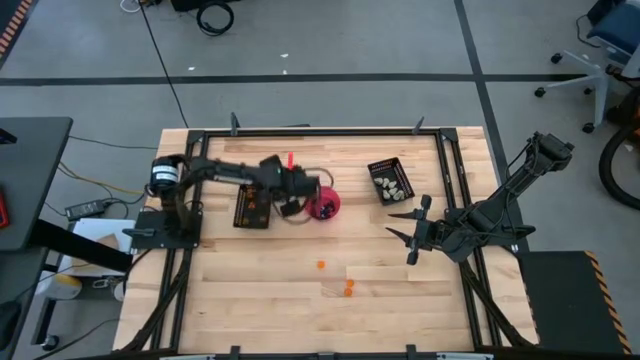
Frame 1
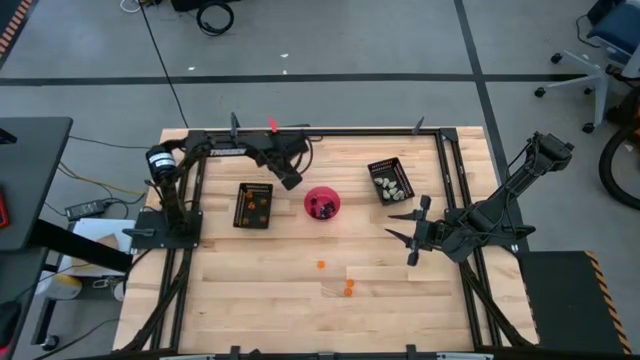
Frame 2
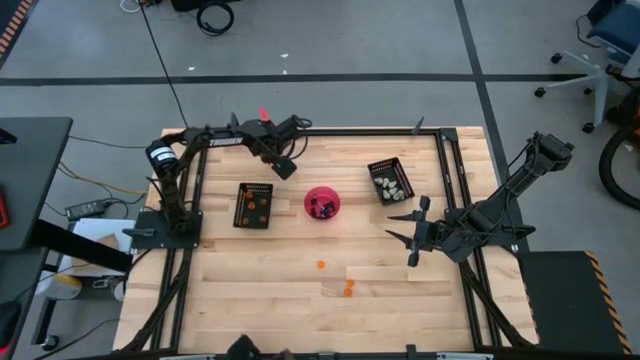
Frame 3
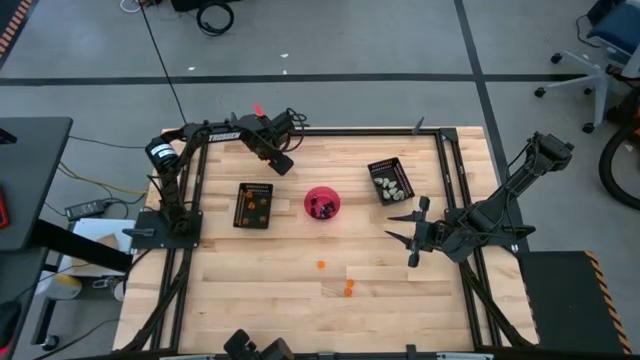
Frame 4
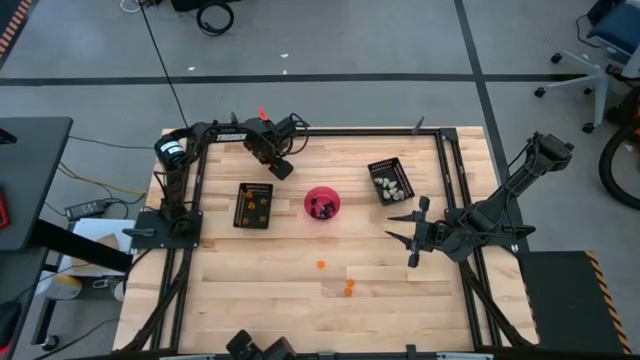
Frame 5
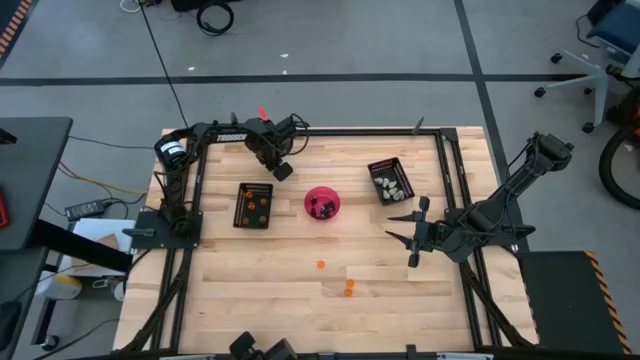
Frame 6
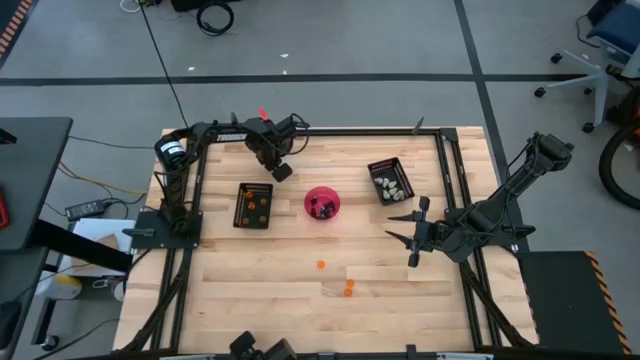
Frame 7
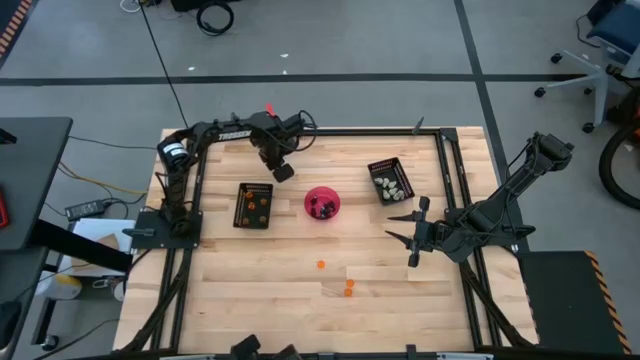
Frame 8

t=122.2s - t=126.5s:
Task: Sort Halloween decoration
Put the orange pumpkin toy into the left black bin

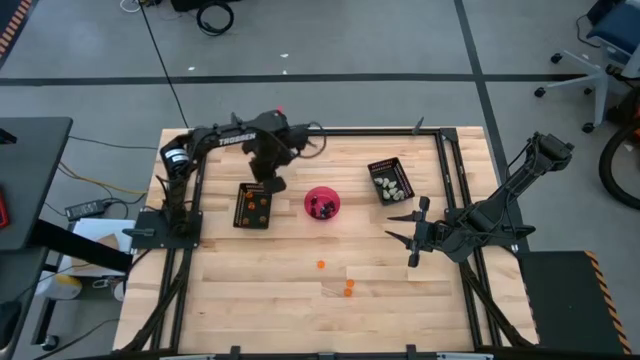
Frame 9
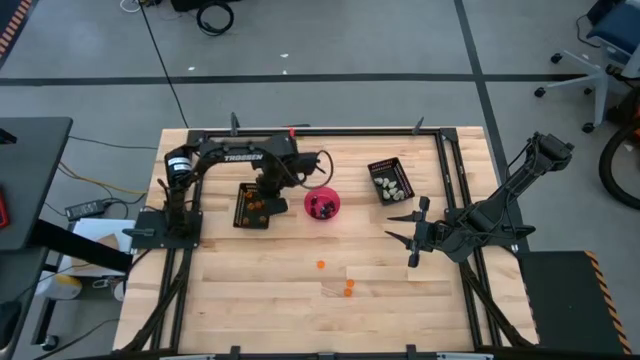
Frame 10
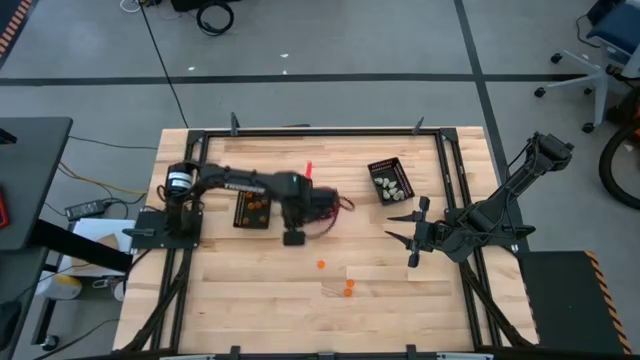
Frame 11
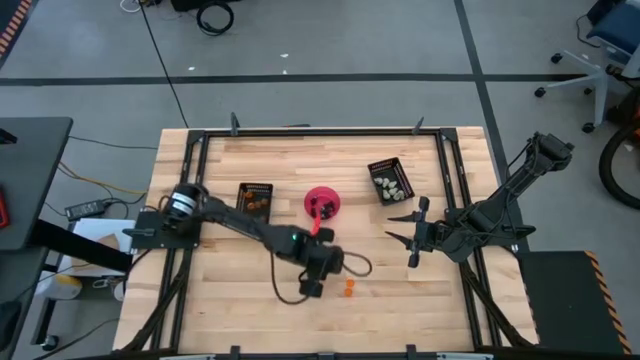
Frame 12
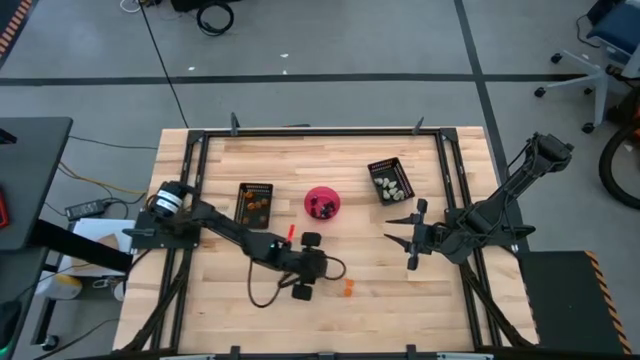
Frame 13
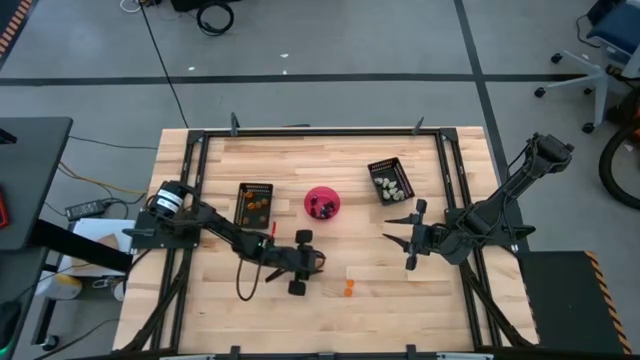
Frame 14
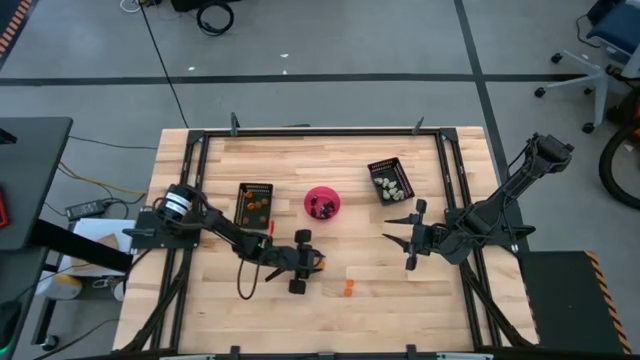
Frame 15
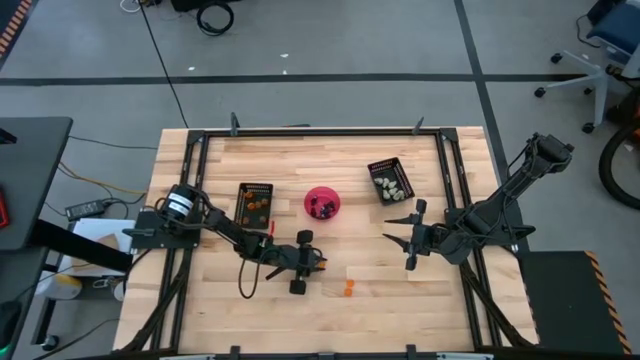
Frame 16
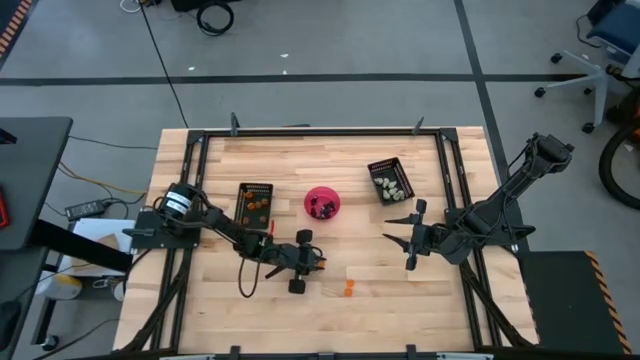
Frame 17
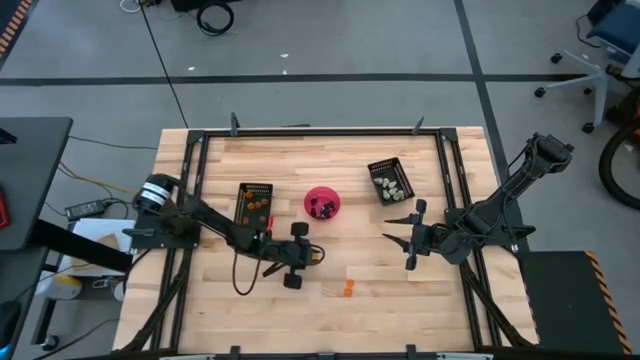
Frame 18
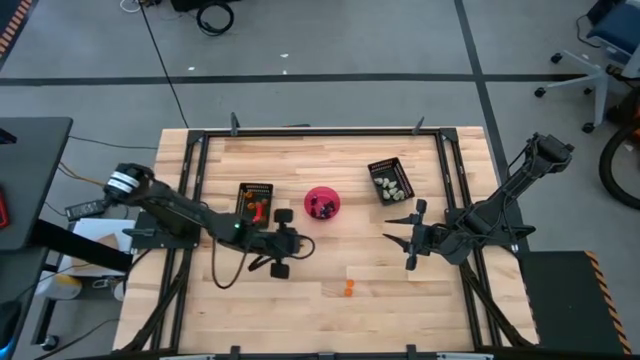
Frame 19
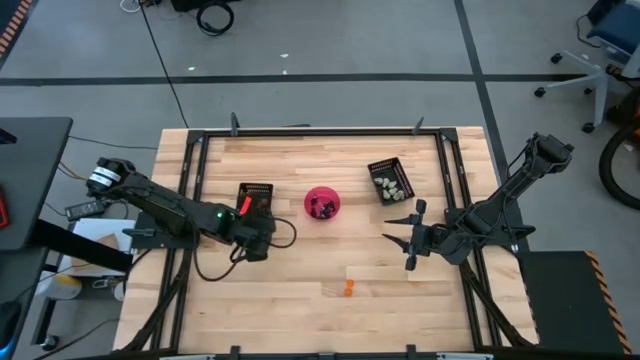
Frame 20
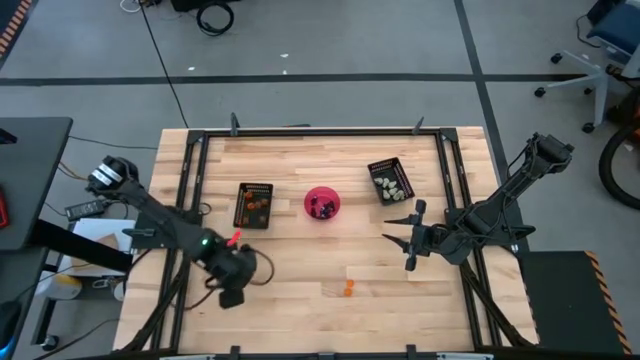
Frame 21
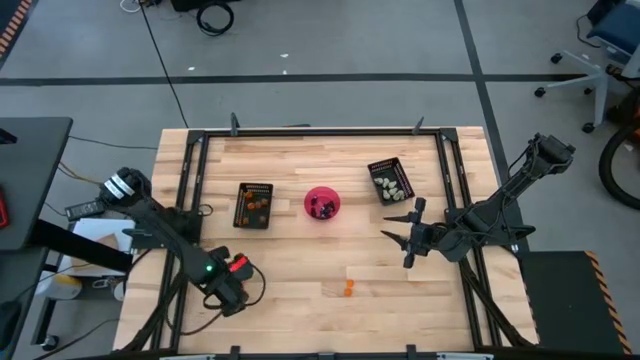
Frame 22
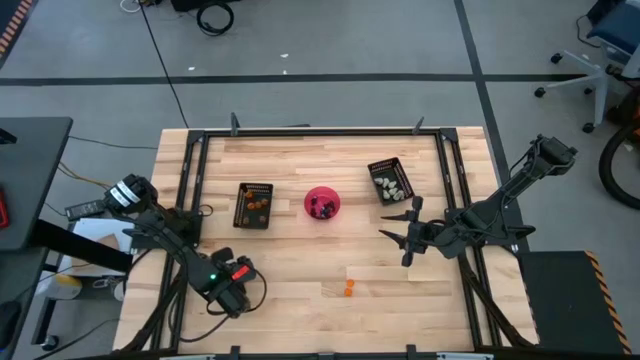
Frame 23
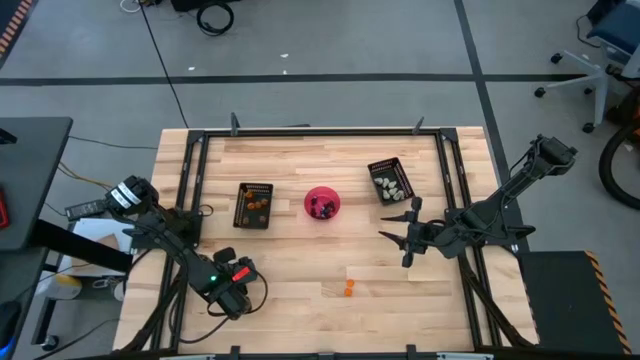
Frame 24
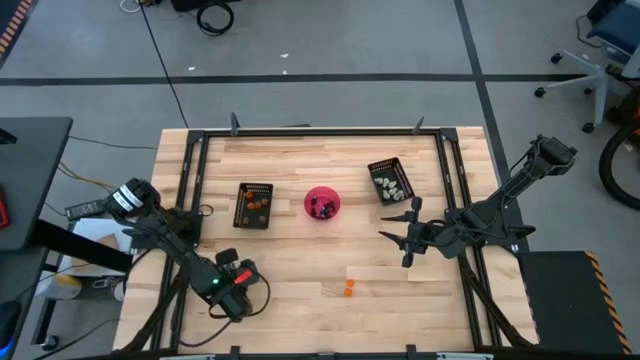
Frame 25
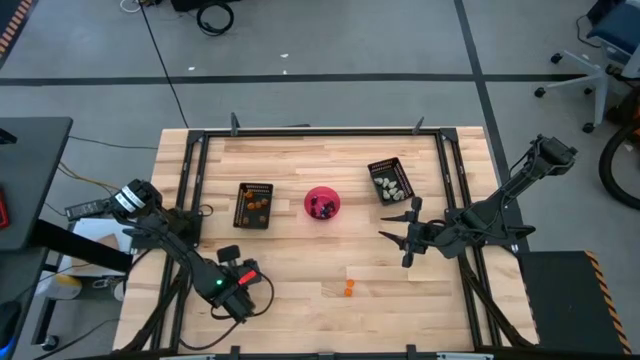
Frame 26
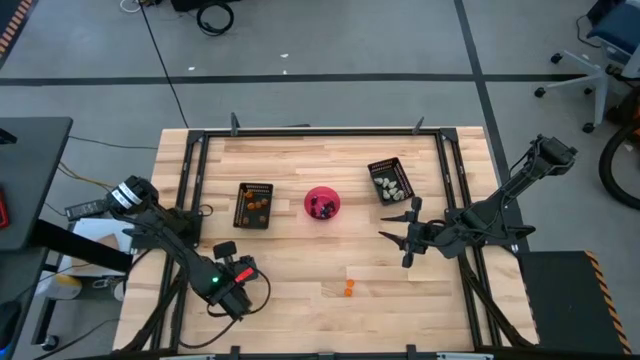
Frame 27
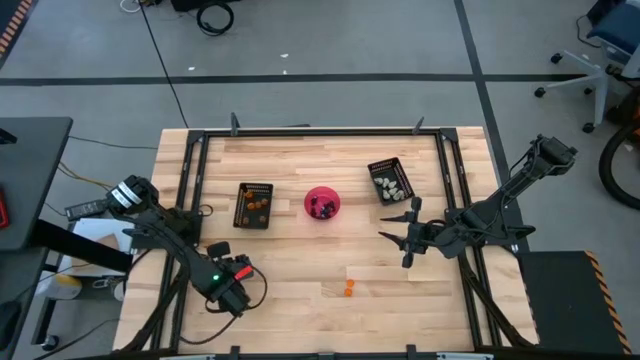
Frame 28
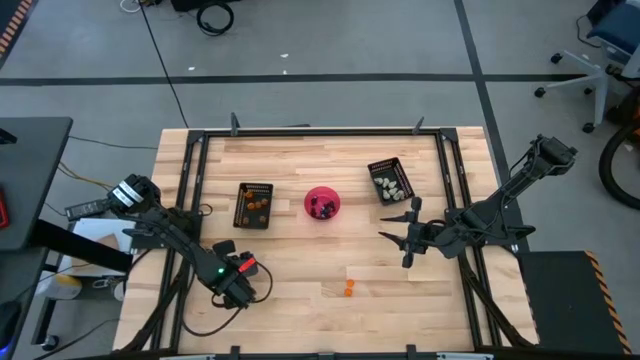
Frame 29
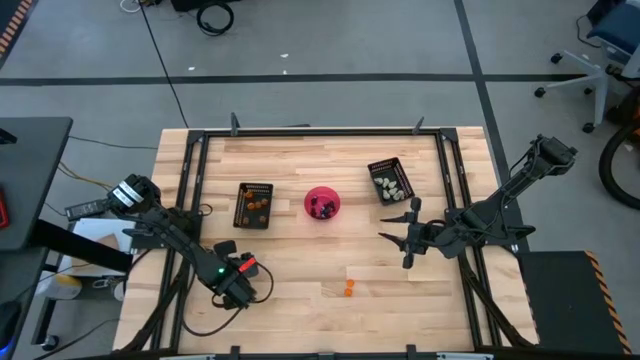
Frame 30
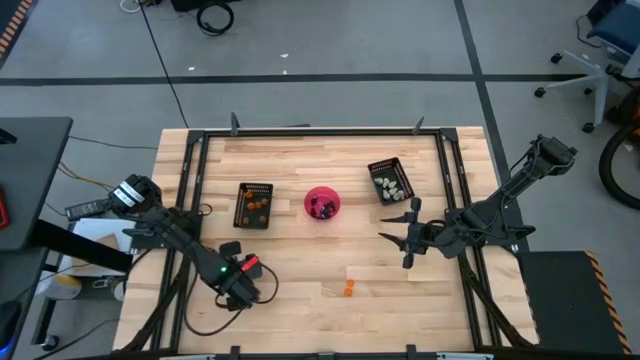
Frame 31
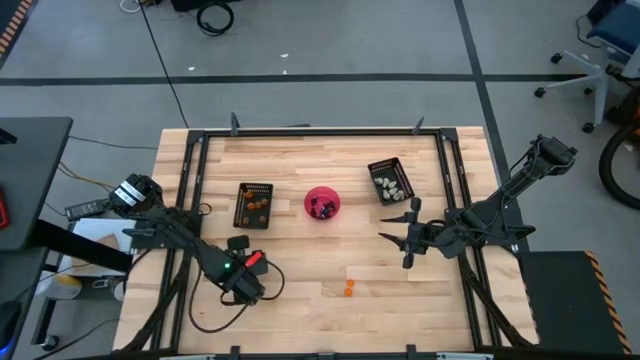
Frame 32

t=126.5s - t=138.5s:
Put the top orange pumpkin toy into the left black bin

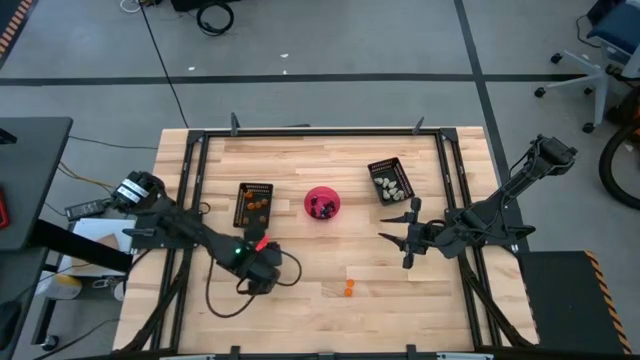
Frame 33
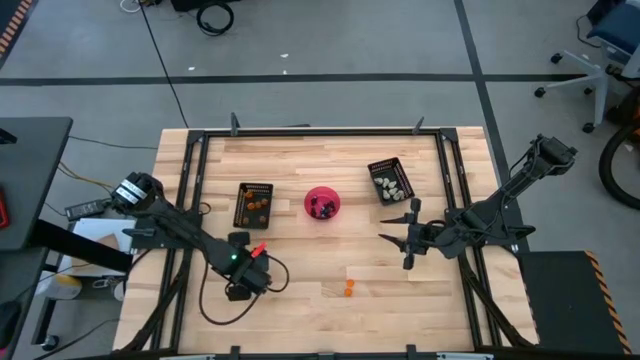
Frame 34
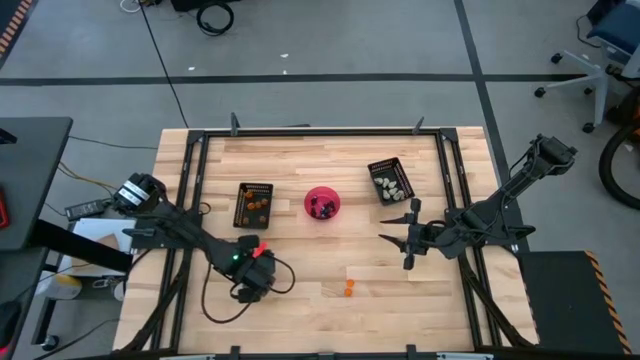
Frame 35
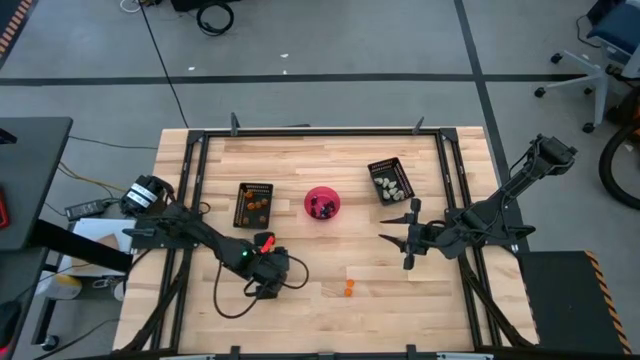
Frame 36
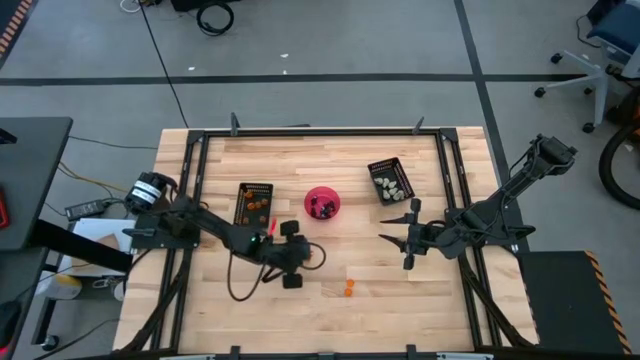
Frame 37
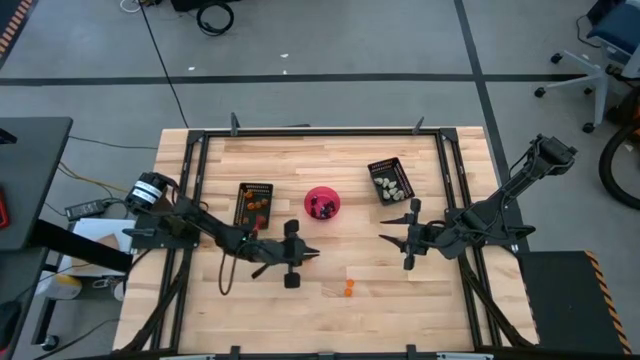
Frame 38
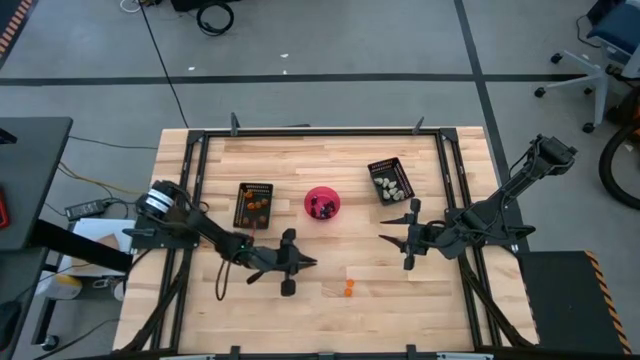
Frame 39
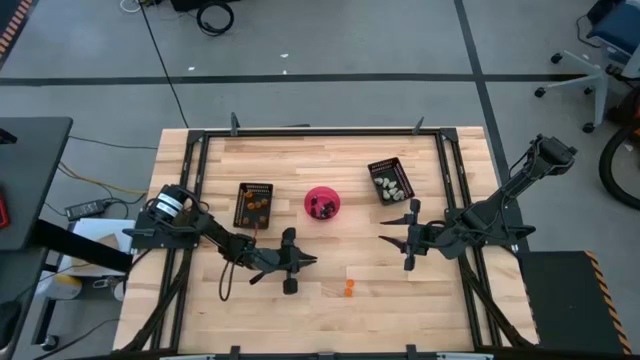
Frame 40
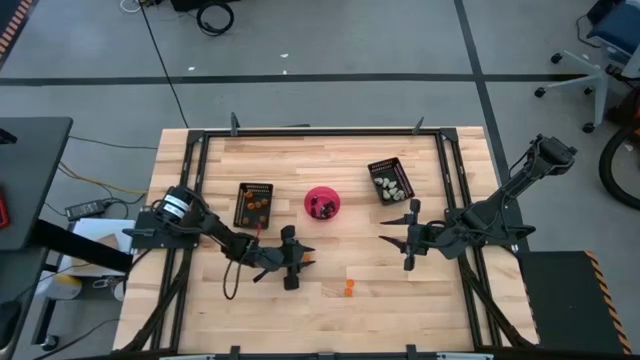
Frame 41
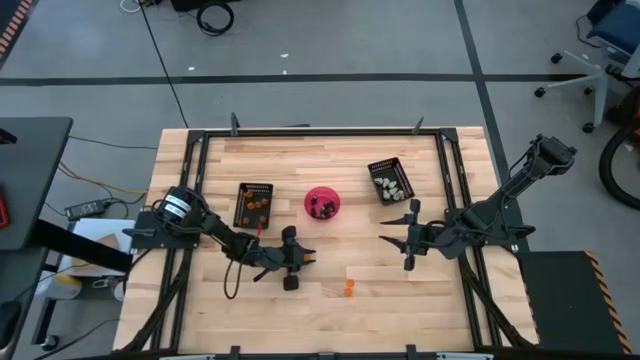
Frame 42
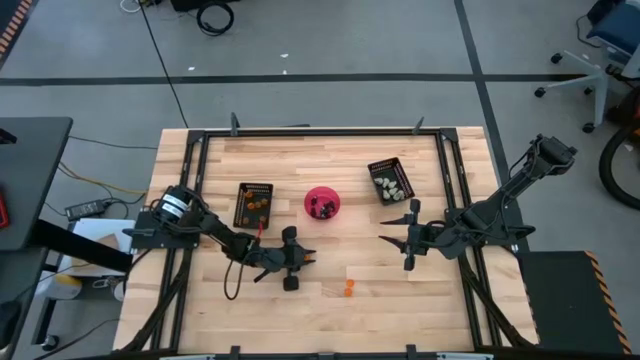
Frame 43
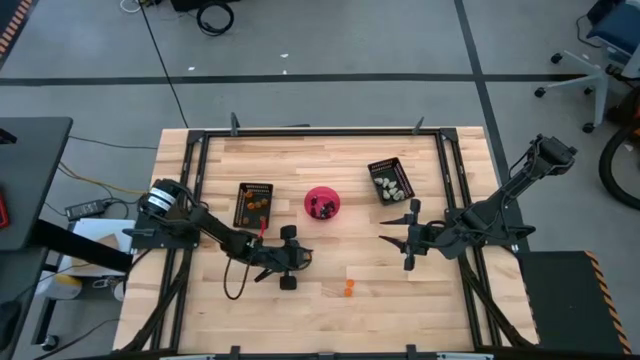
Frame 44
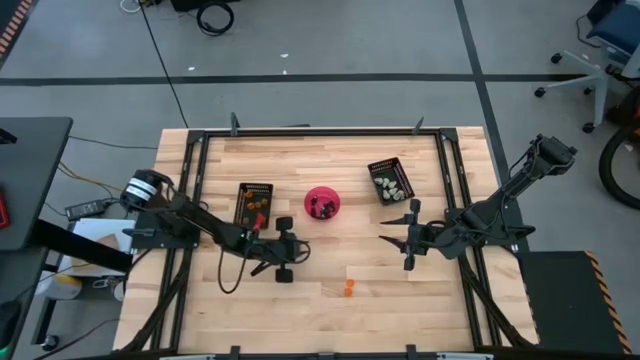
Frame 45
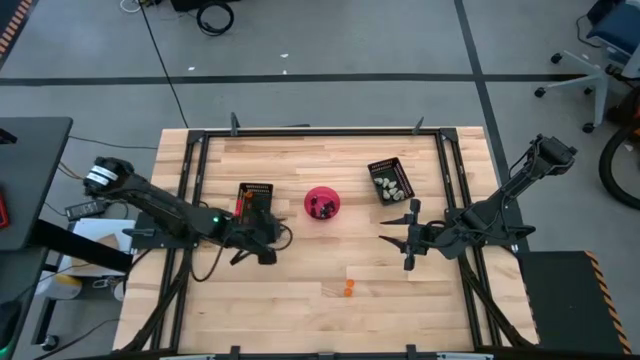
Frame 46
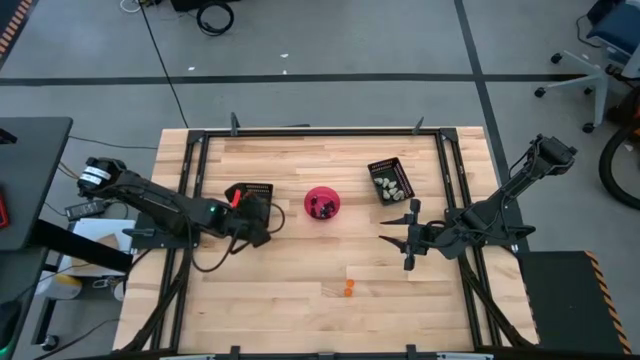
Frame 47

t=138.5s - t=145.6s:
Put the orange pumpkin toy into the left black bin
